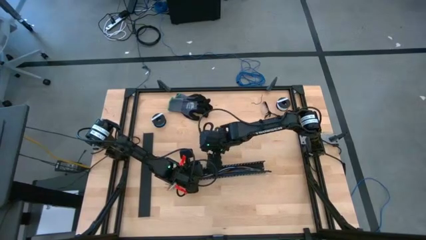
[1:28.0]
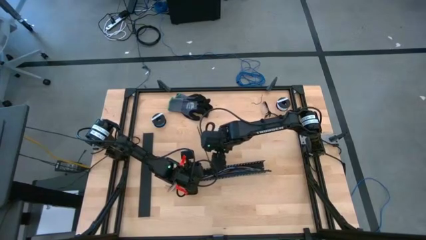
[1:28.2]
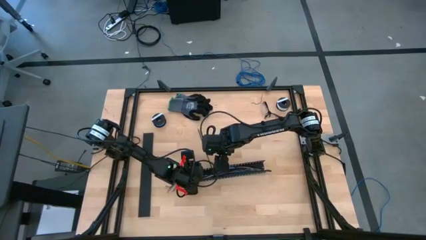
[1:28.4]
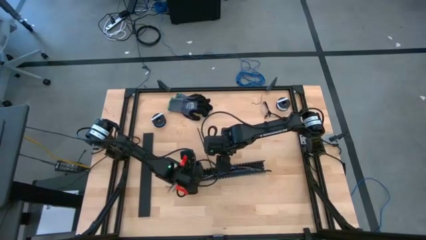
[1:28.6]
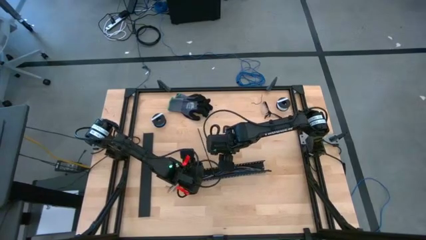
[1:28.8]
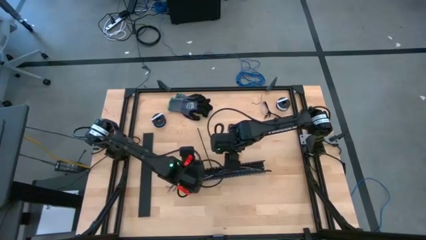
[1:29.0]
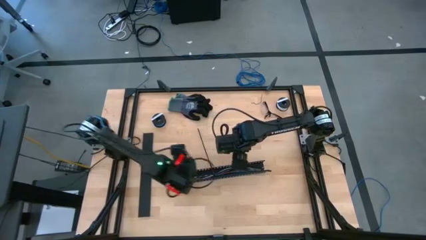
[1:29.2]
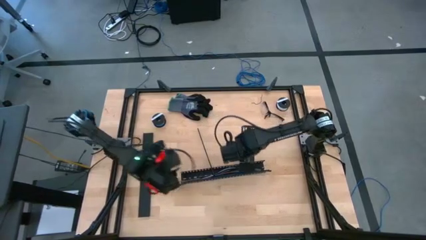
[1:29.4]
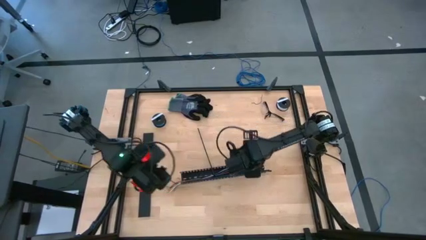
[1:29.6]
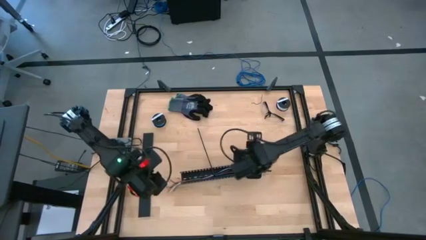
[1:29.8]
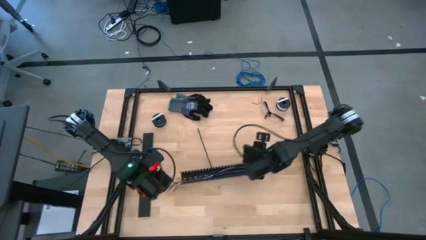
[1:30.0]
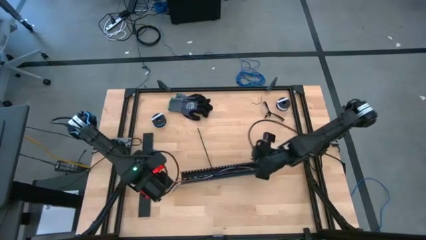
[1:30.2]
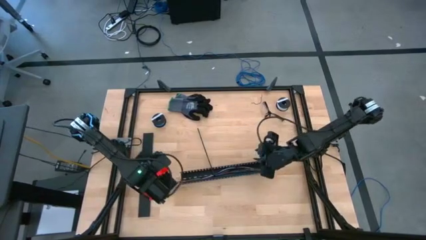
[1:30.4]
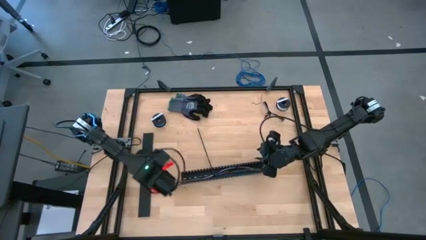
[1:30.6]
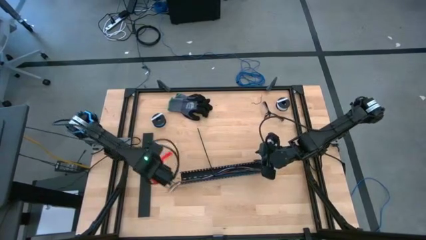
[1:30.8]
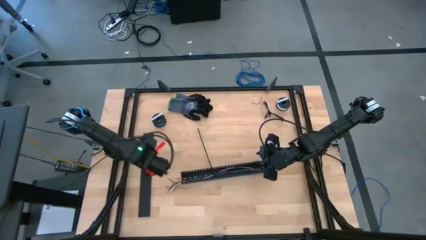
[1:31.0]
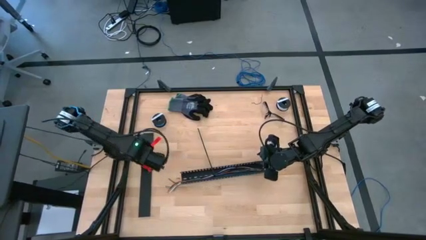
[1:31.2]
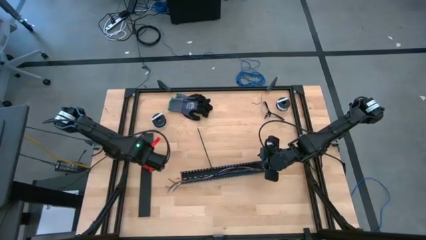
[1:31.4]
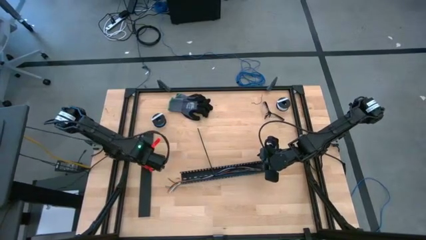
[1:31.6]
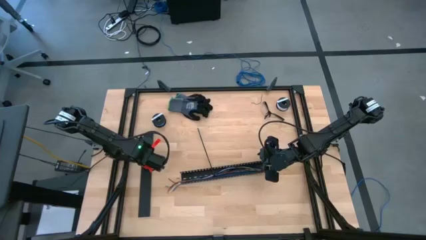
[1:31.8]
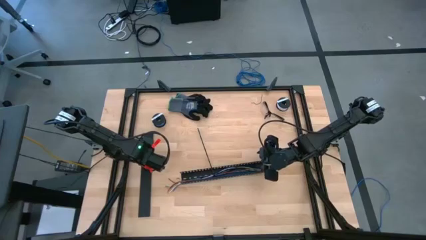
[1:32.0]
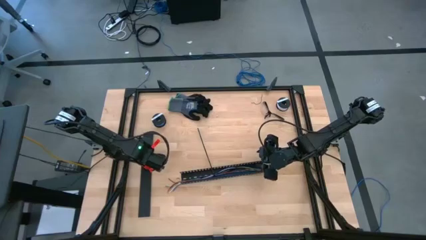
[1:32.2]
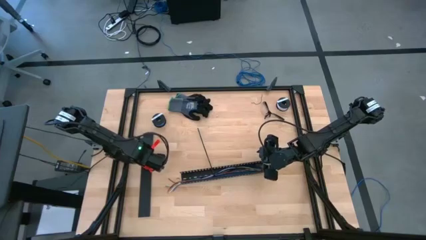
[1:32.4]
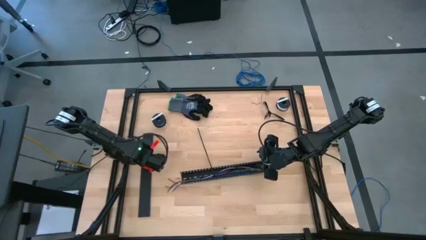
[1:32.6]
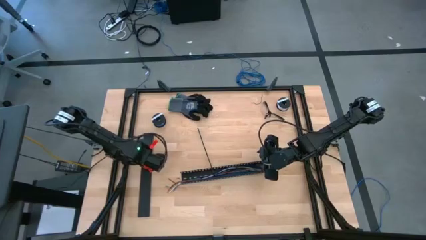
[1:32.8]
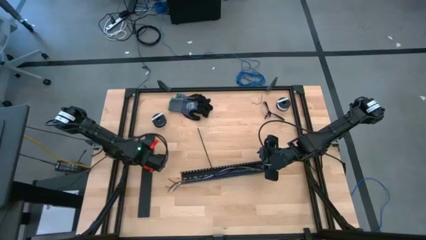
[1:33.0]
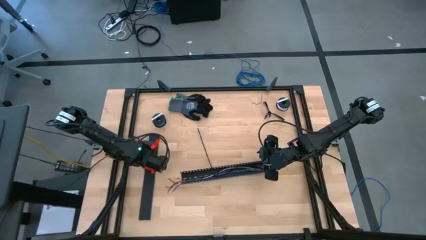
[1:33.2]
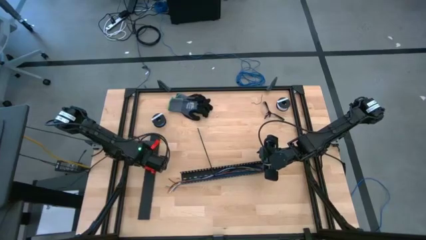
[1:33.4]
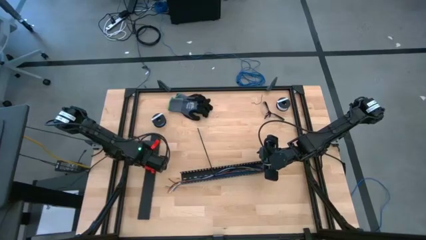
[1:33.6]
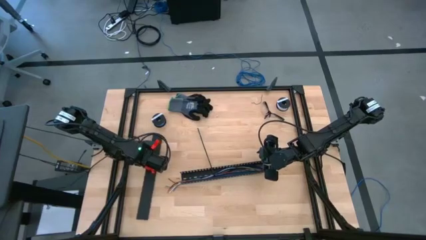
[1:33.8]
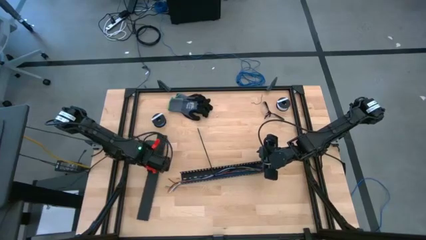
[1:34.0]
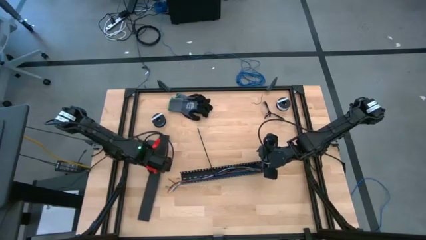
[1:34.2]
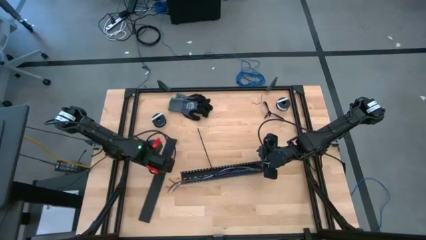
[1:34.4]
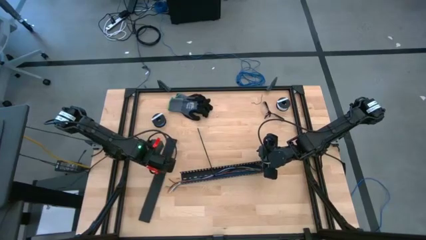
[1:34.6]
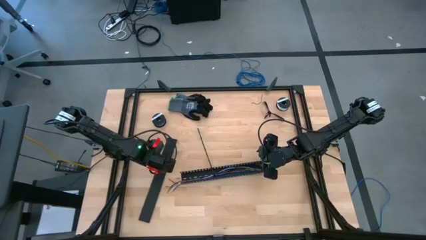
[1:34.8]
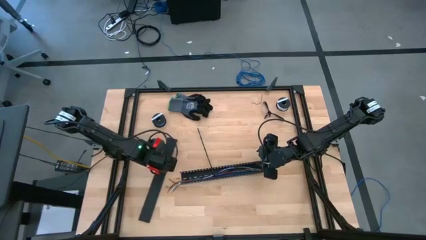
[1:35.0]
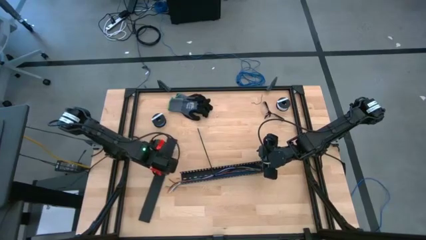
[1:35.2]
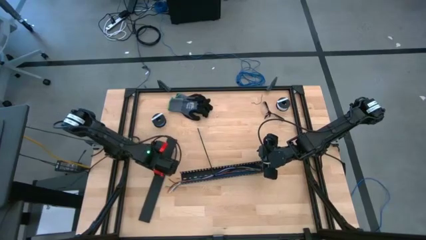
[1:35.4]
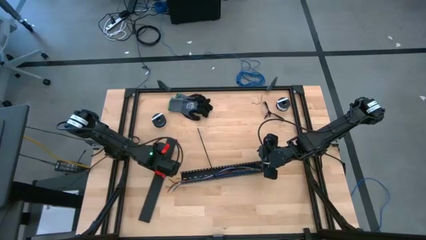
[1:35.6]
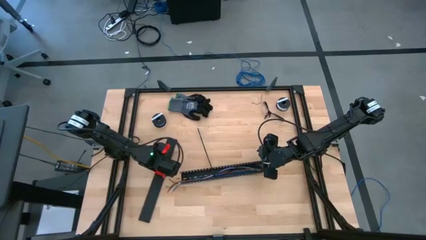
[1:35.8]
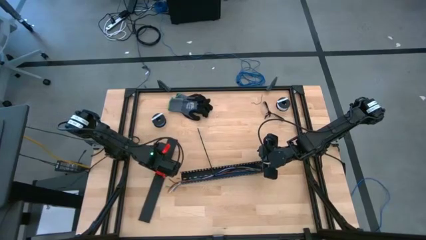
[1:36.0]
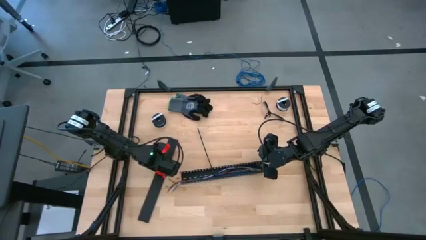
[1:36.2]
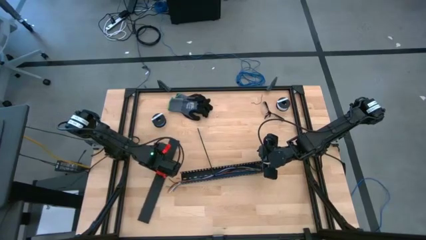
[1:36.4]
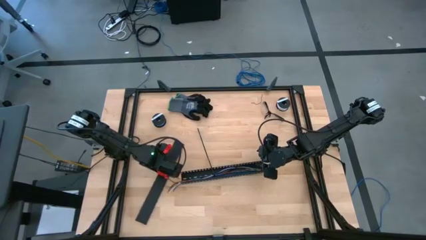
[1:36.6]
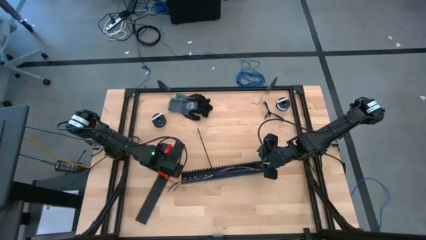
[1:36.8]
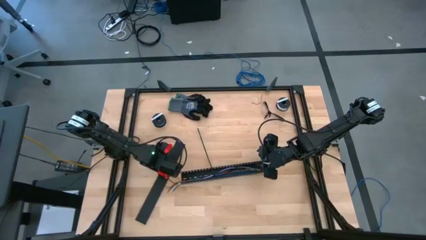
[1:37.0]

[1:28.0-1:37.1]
Task: Ziptie cables
Close the black cable duct

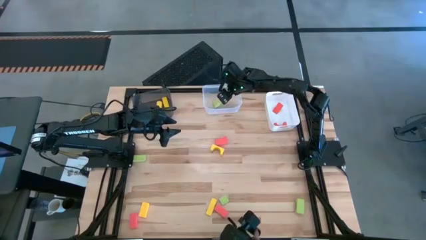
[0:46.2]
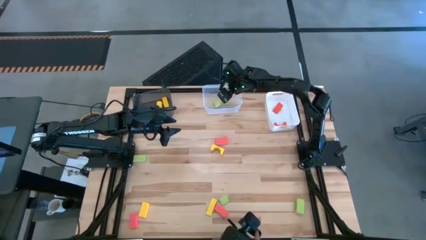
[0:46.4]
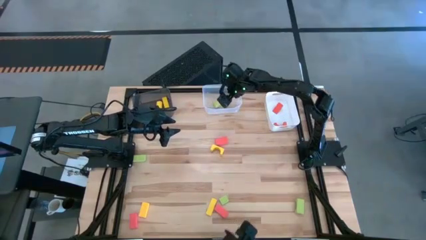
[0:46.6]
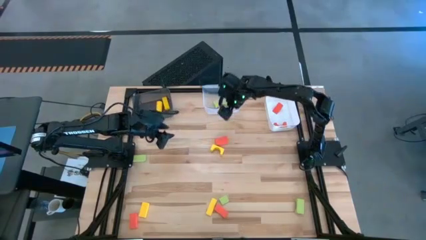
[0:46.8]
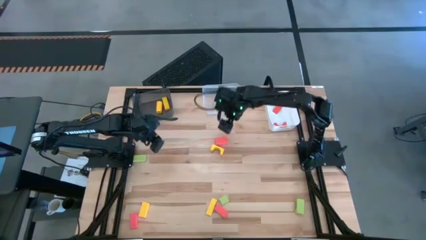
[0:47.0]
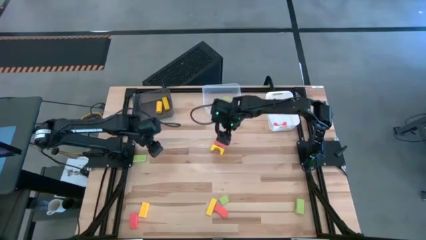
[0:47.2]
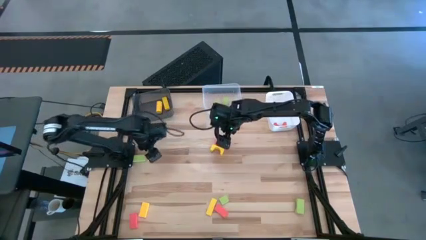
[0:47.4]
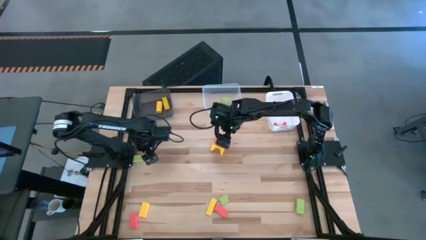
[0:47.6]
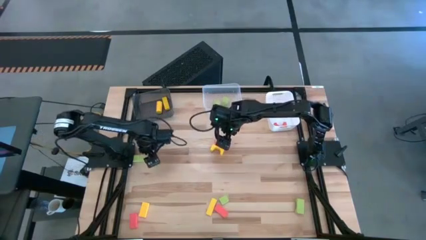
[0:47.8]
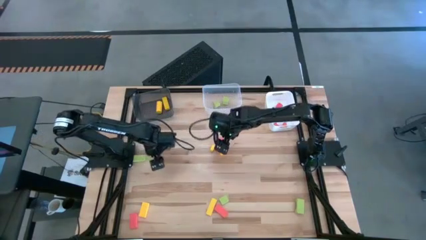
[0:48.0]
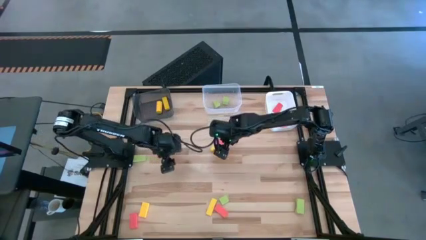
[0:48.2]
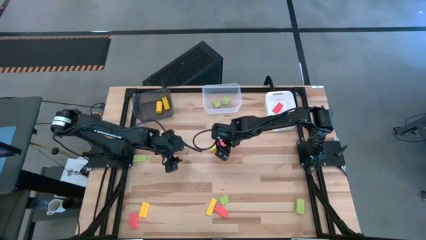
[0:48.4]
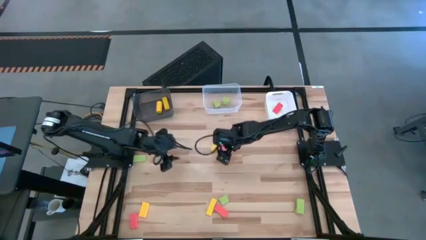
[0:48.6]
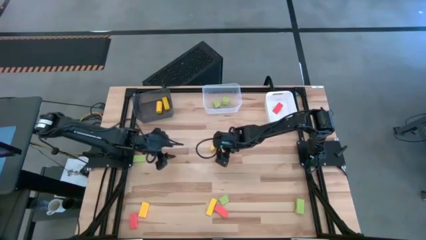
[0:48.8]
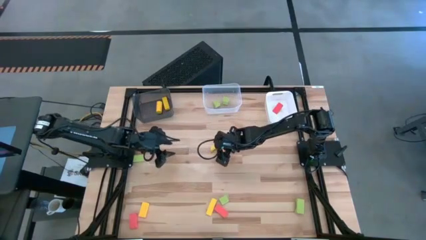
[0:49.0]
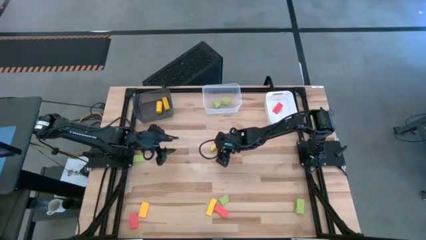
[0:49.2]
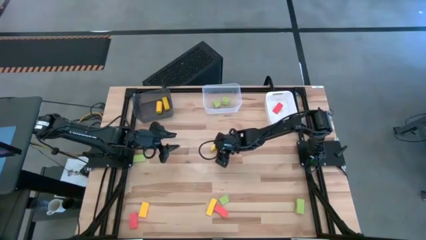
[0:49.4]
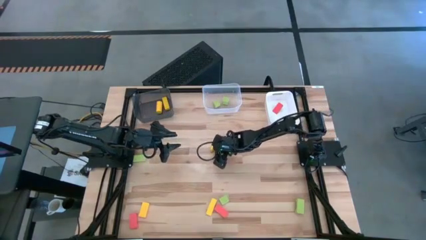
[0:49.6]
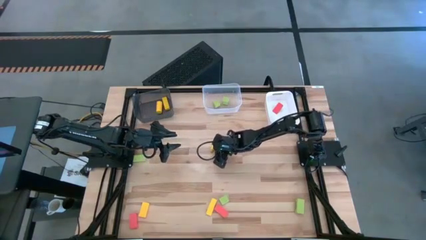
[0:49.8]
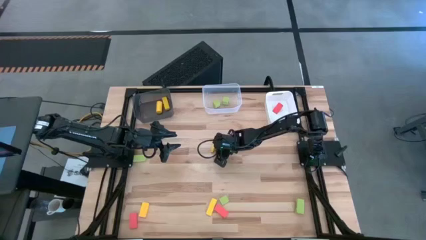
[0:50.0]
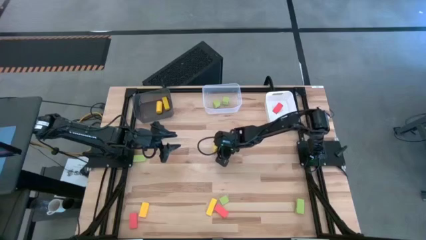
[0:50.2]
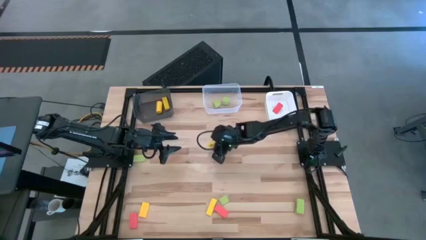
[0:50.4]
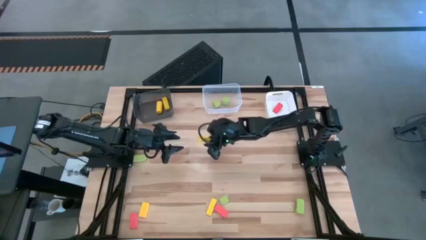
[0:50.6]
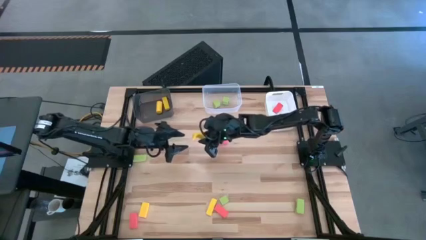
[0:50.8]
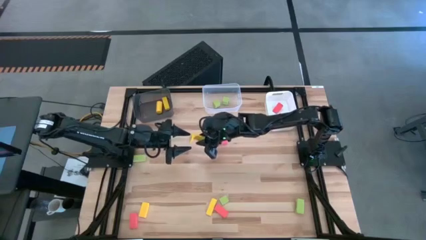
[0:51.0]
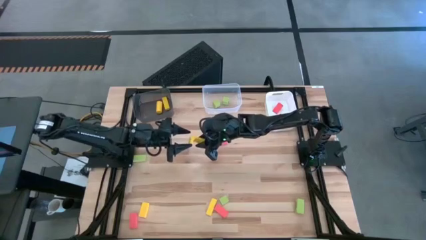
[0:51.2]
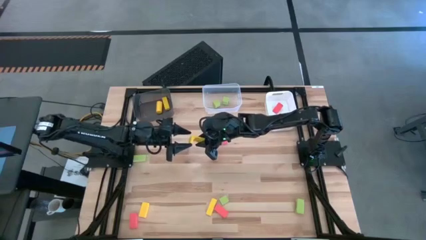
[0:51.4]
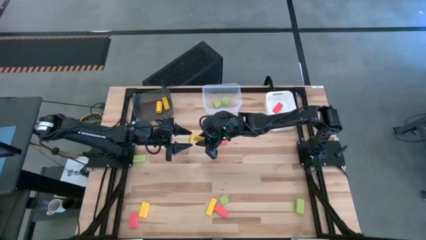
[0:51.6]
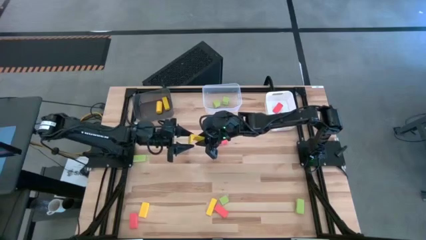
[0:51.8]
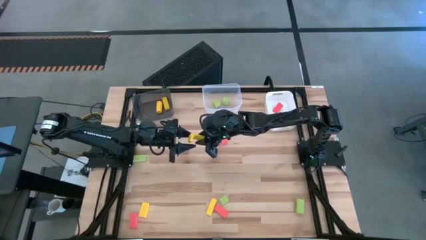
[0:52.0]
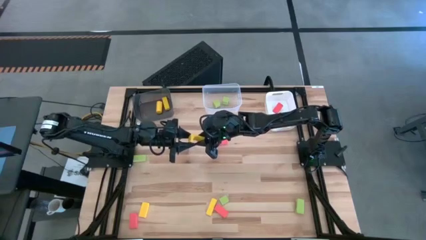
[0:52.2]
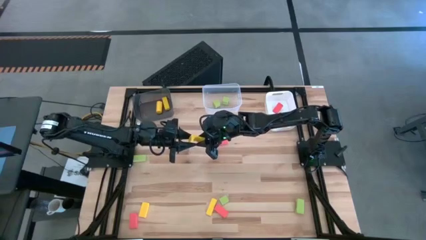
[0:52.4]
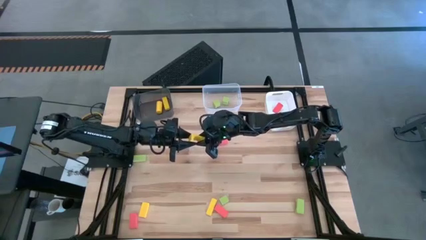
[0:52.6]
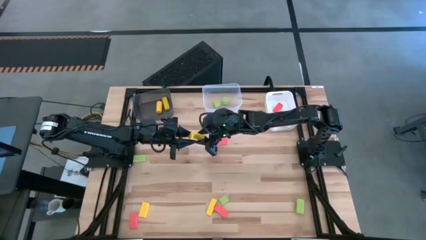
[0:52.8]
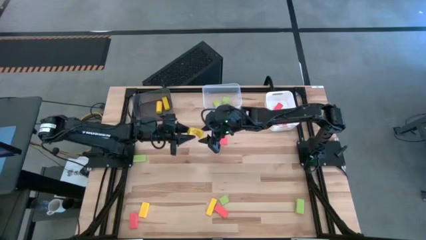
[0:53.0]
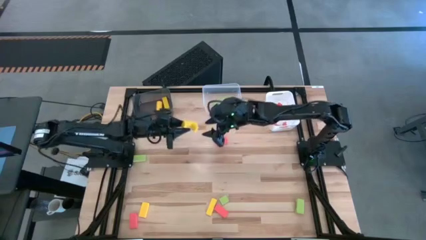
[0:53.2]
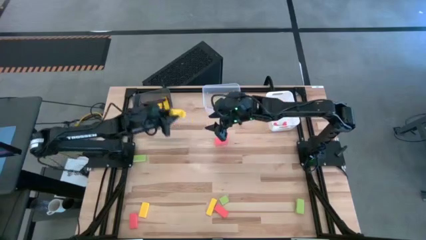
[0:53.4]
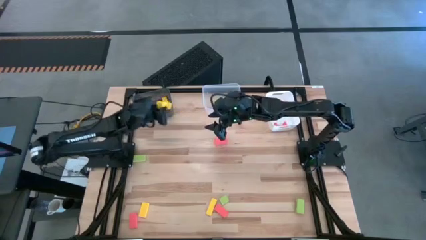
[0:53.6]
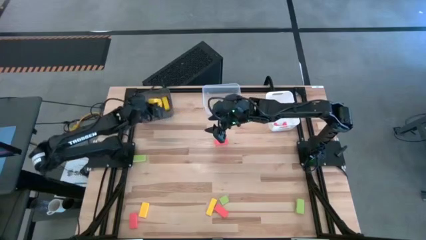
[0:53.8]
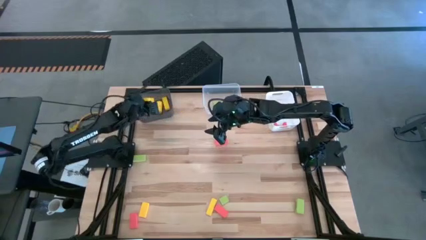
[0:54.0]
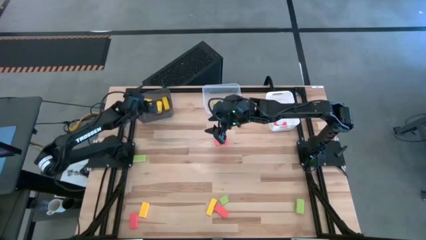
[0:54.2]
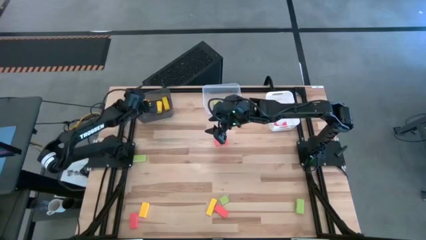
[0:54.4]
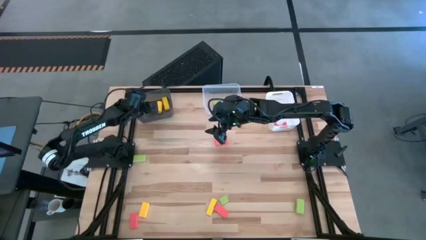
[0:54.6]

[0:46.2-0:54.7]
Task: Sort & place blocks by color
Put the yellow block into the black bin
